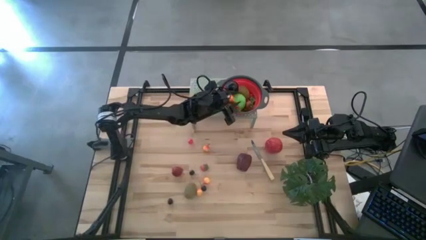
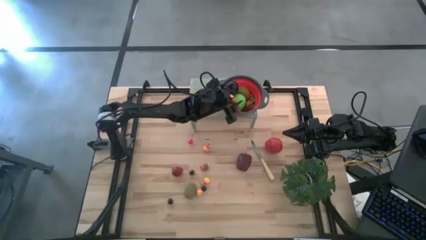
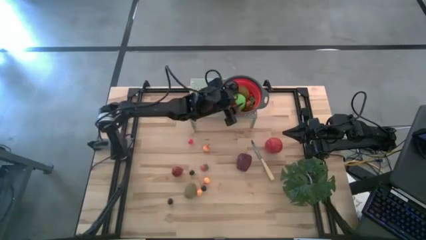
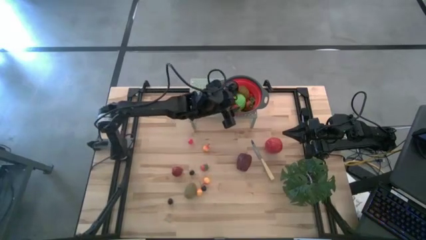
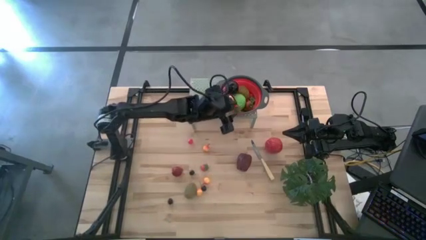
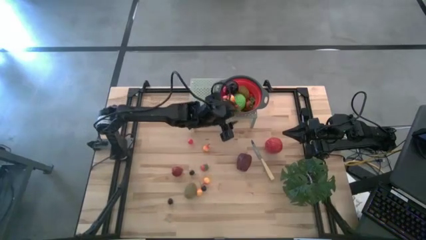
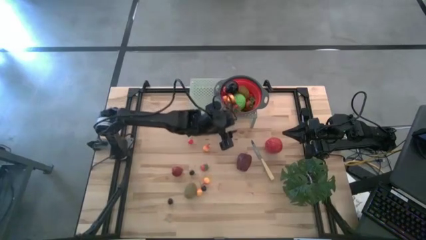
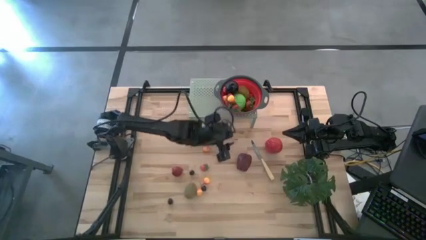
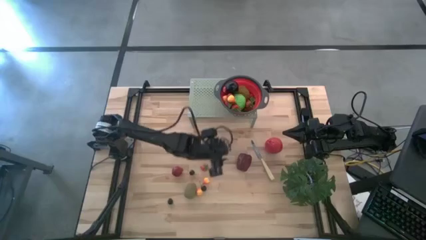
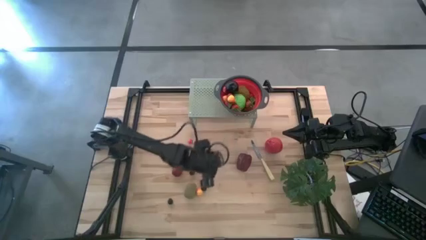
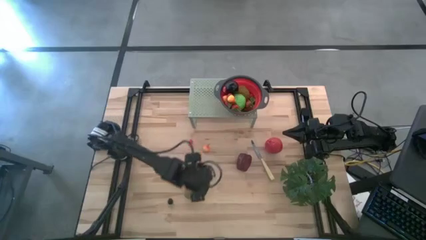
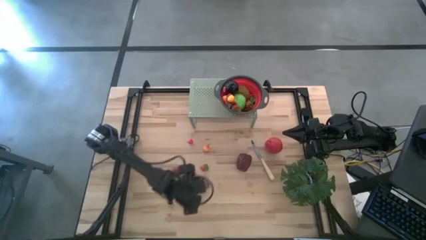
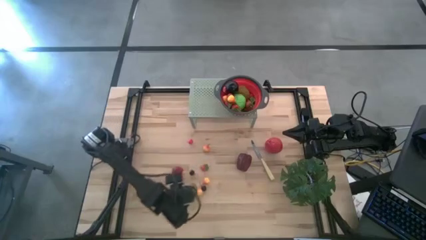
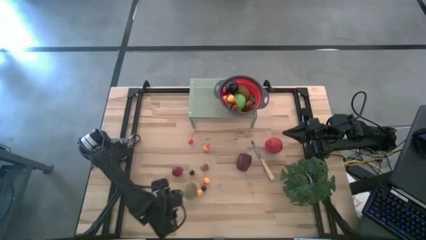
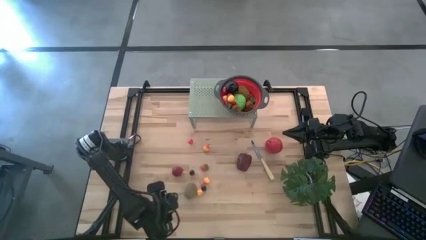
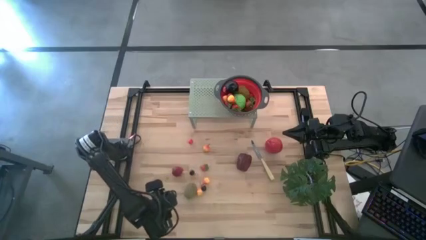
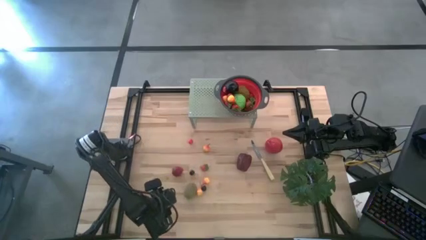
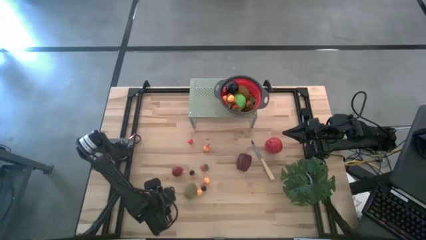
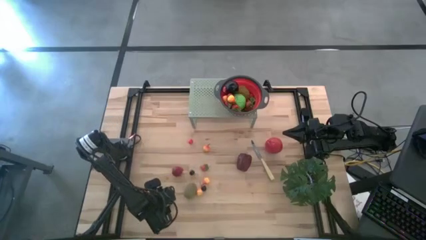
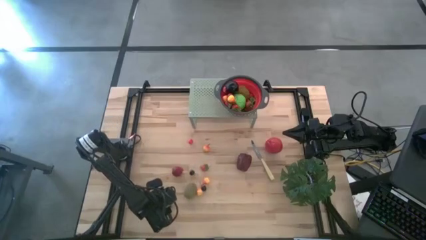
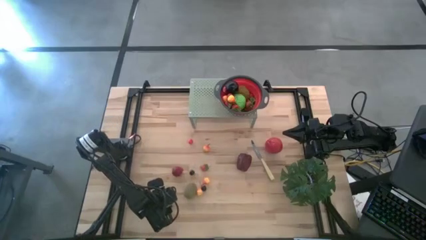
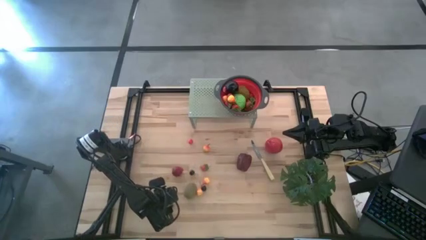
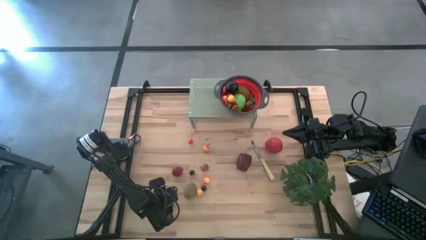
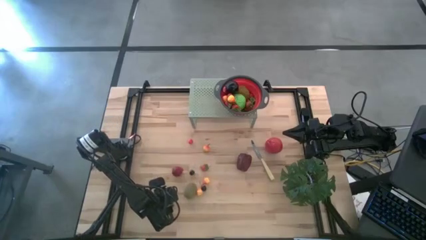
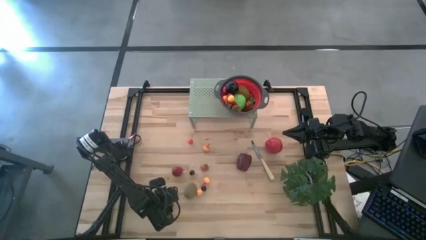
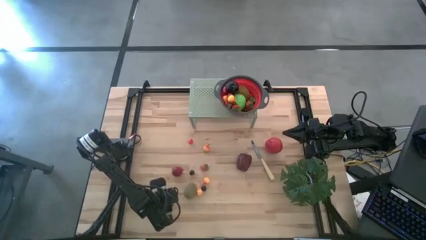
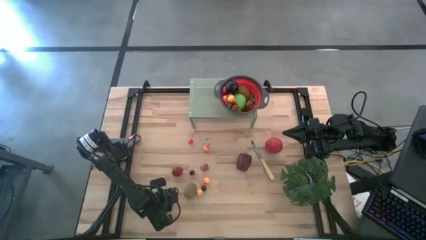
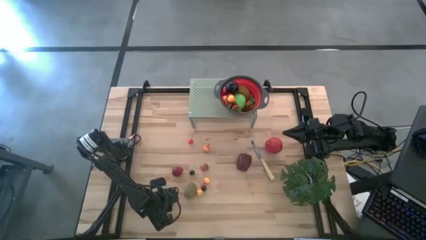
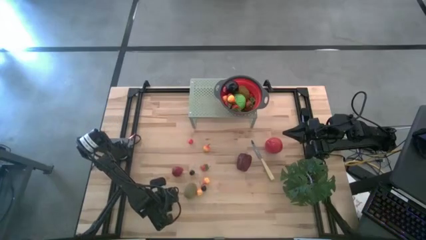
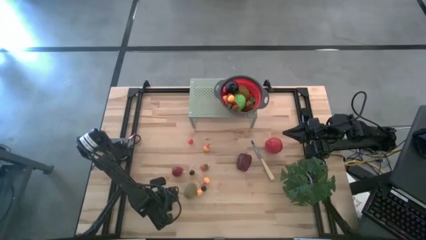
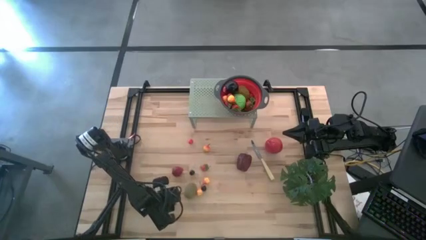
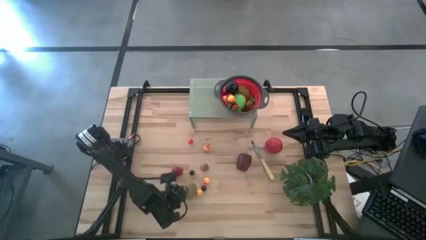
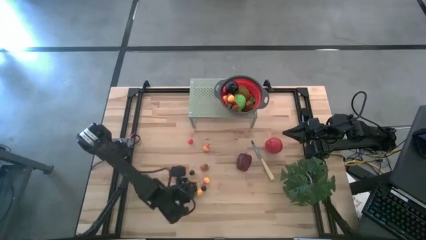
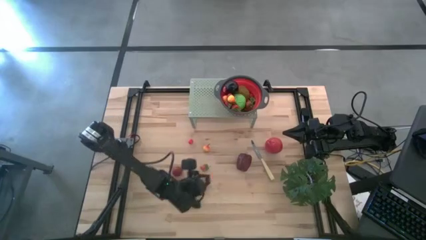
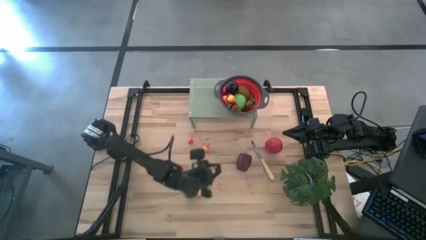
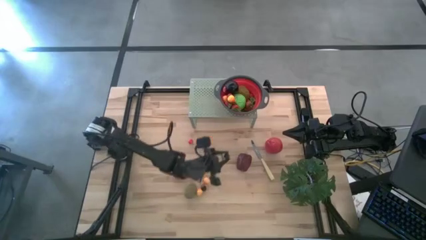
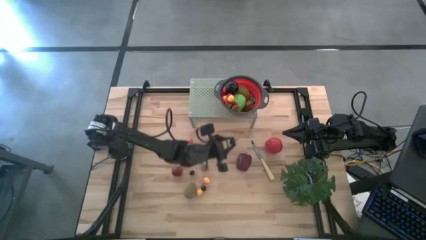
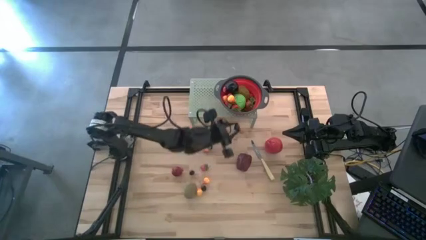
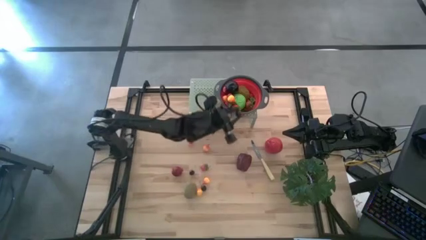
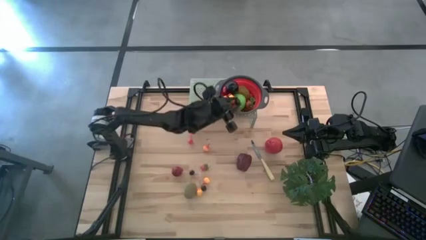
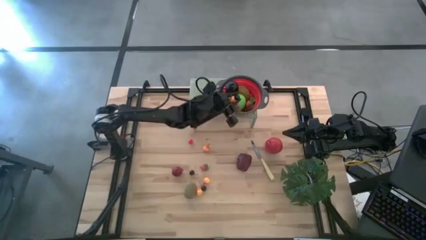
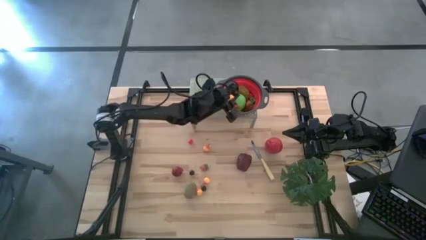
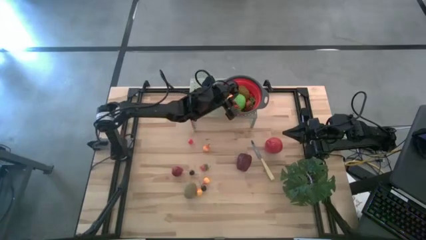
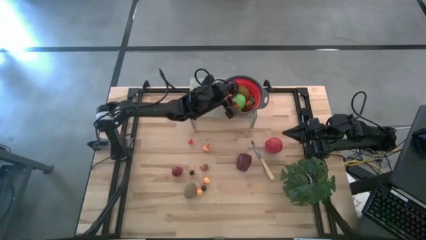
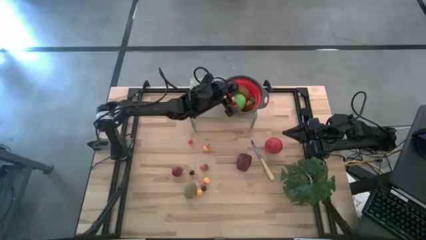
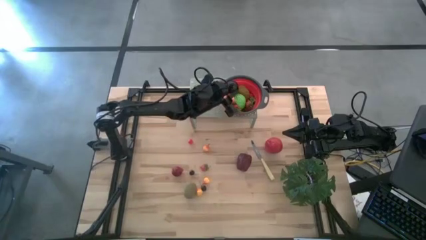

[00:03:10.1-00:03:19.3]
Task: Pick & Place Fruit
Put the blackberry into the black strainer bowl on the shelf

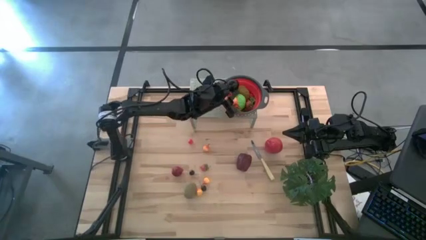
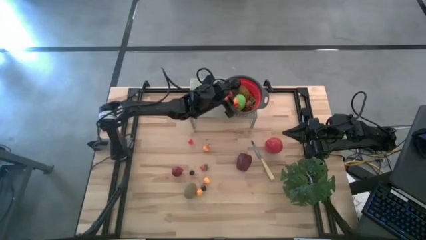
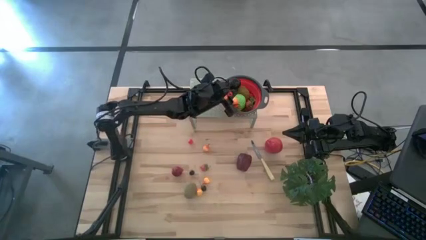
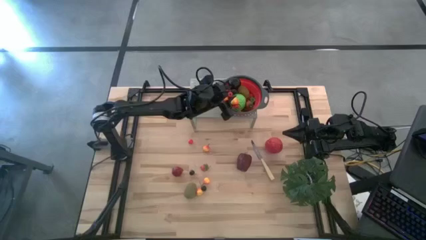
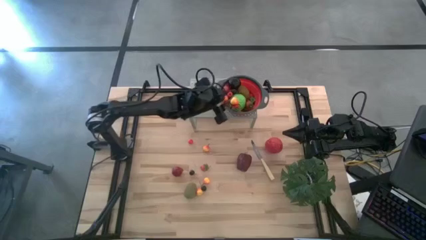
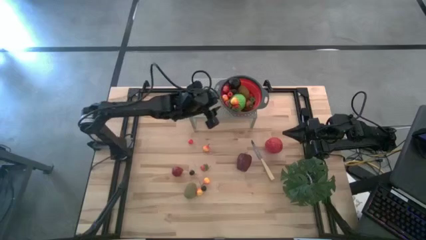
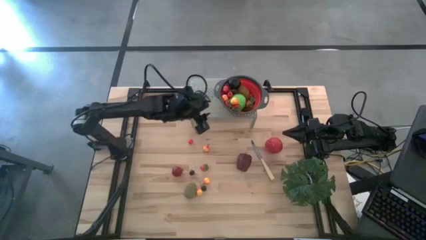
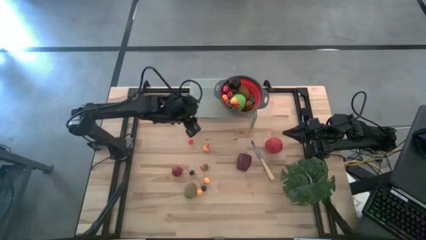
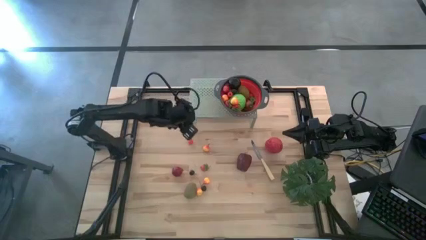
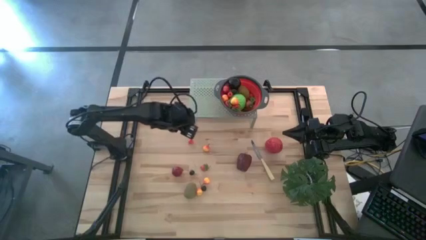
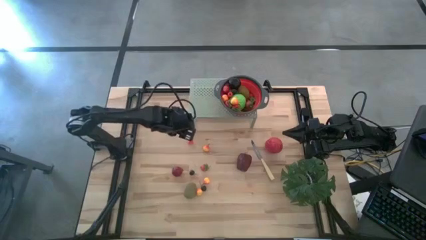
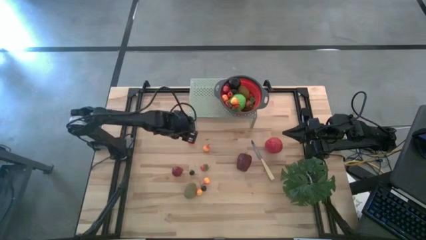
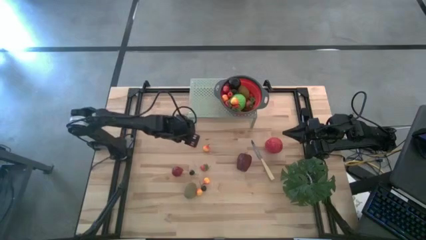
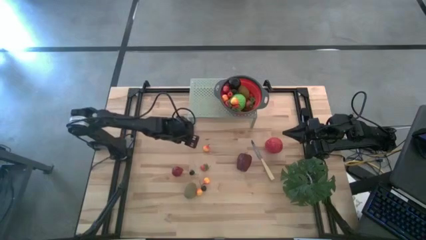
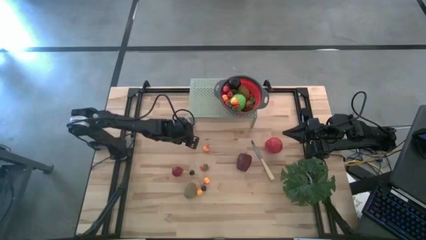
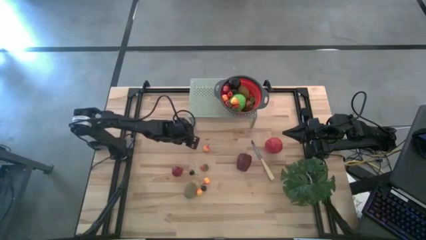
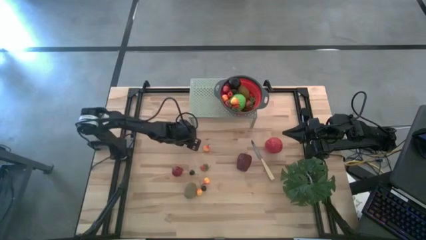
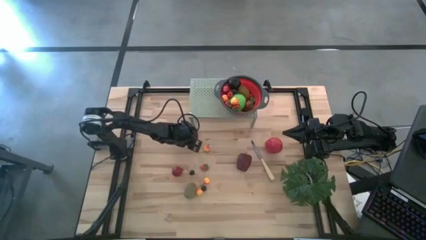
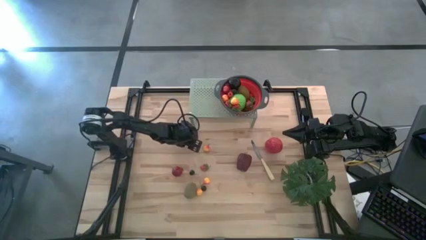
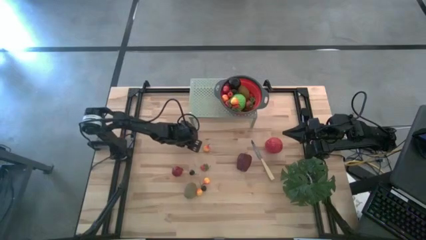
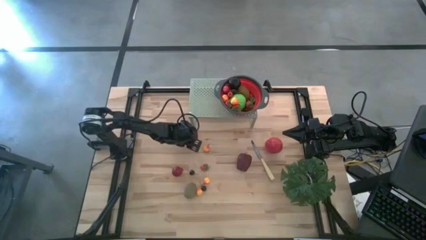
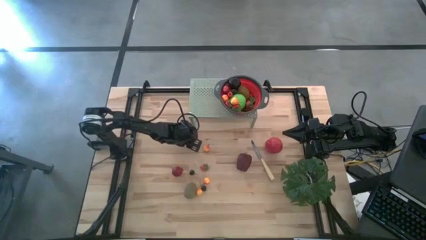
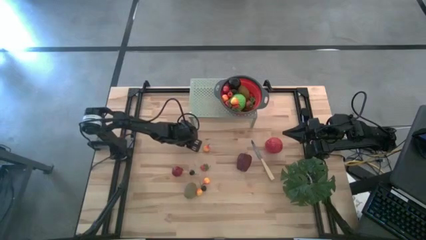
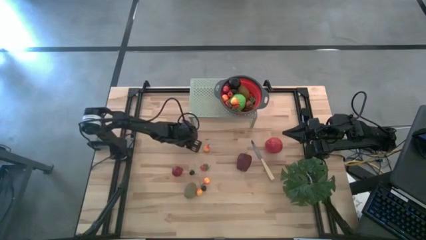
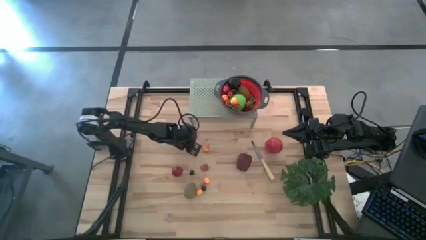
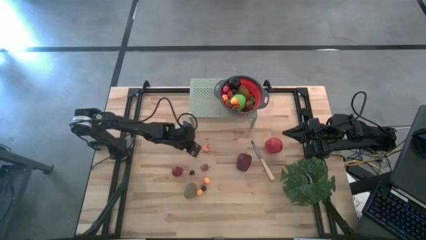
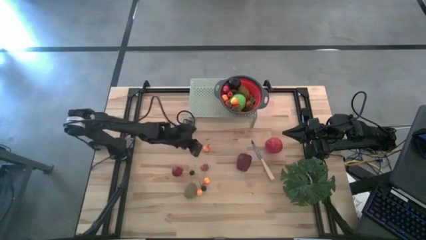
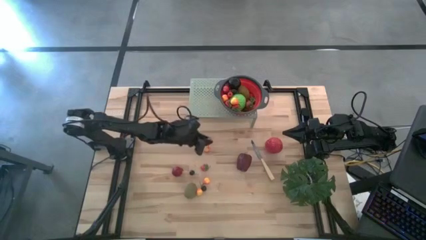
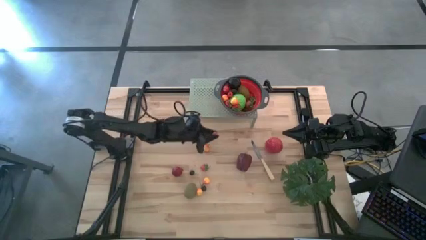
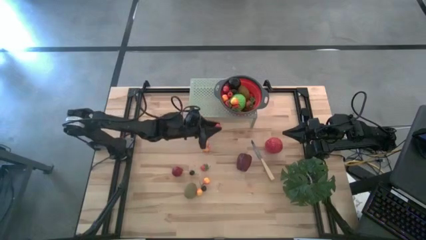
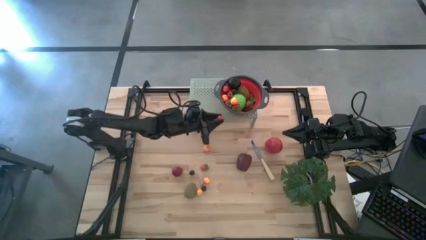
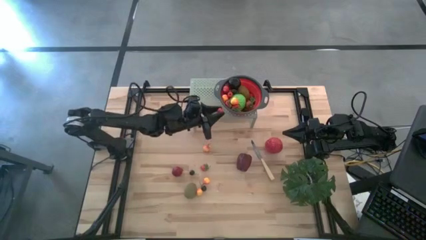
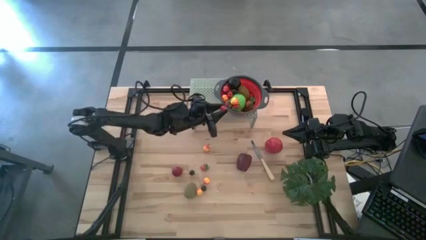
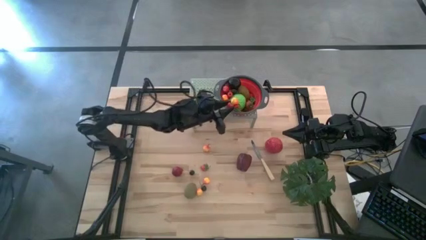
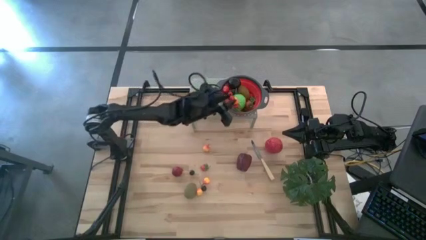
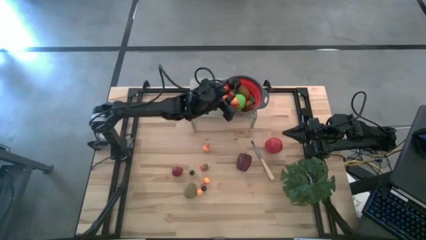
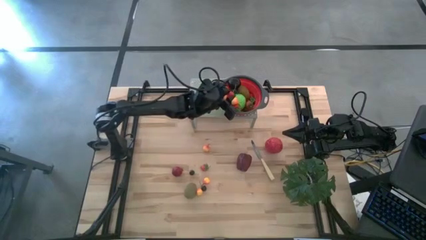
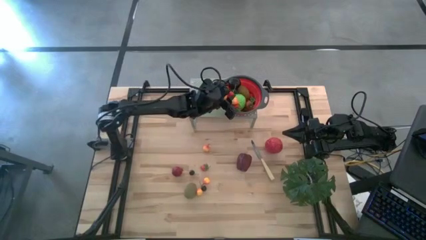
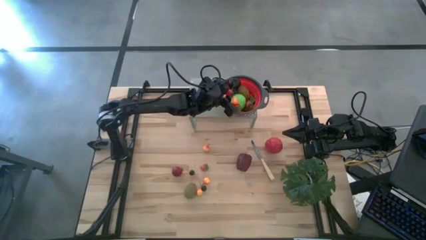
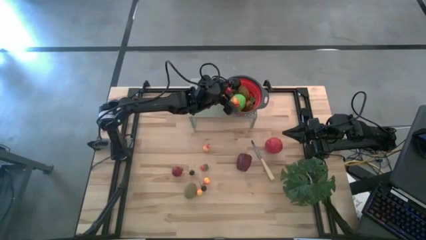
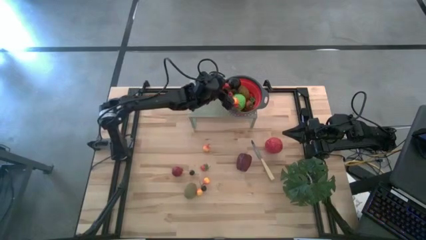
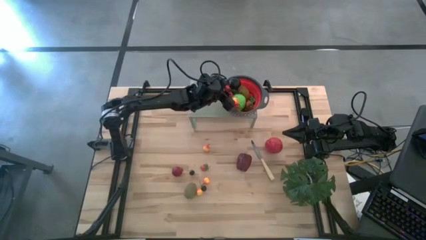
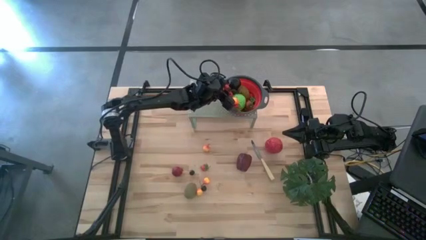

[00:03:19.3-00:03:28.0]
Put the red cherry into the black strainer bowl on the shelf
